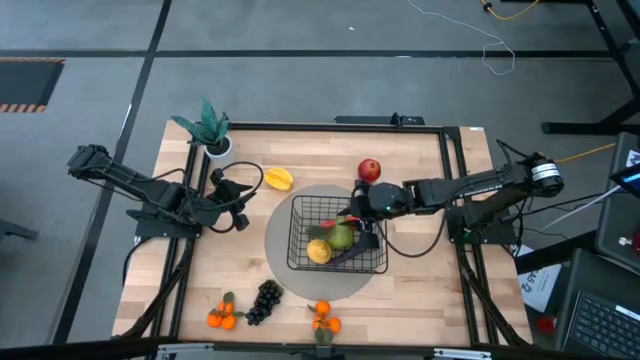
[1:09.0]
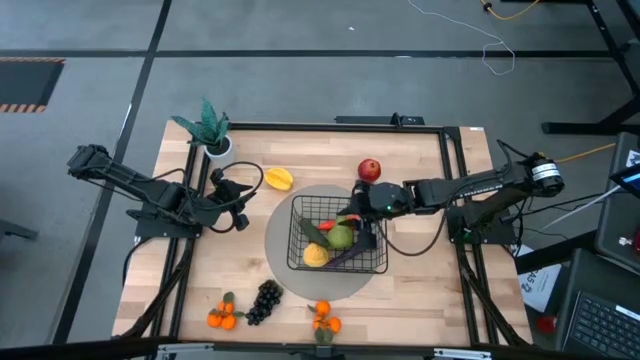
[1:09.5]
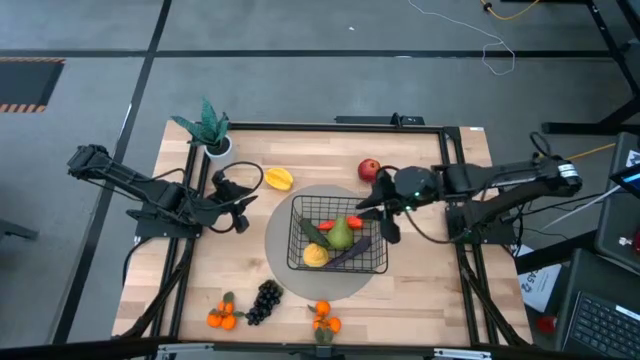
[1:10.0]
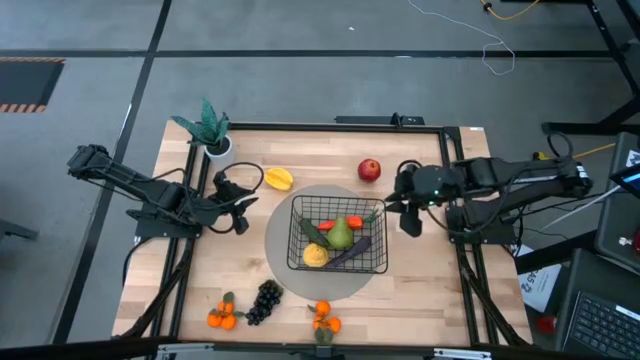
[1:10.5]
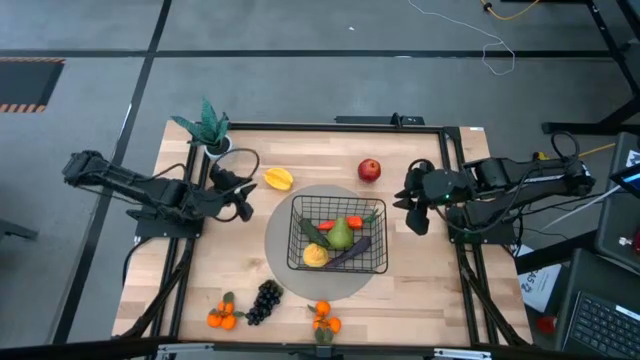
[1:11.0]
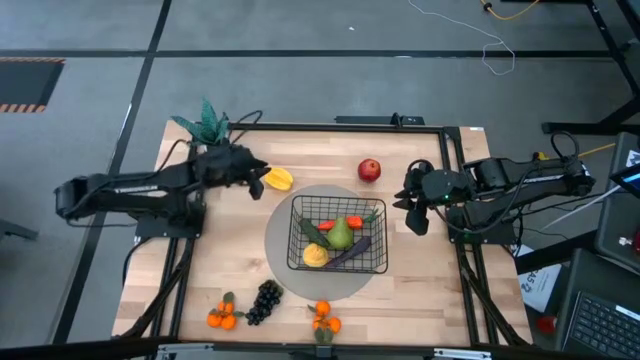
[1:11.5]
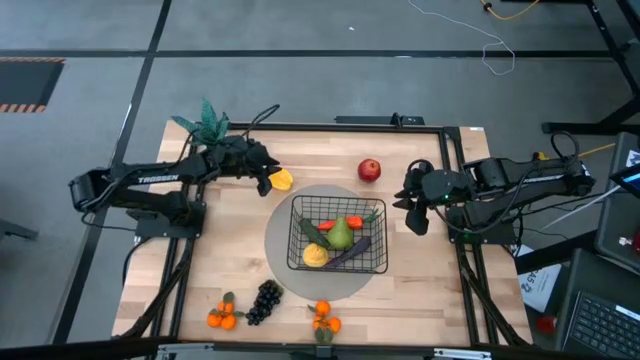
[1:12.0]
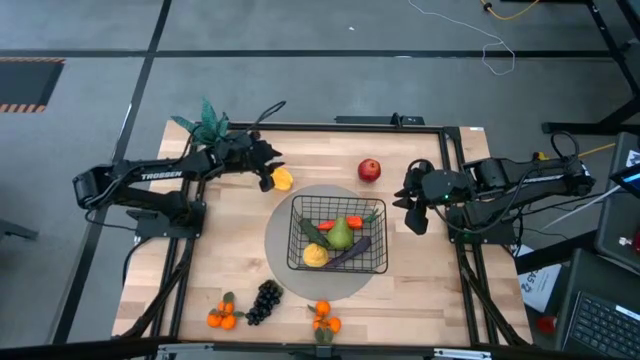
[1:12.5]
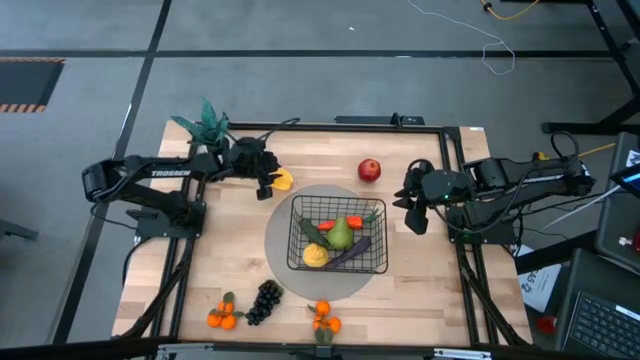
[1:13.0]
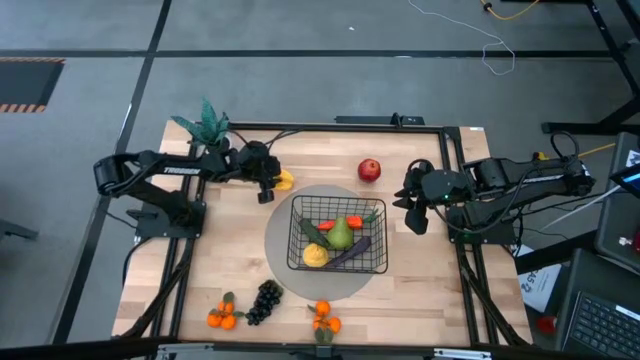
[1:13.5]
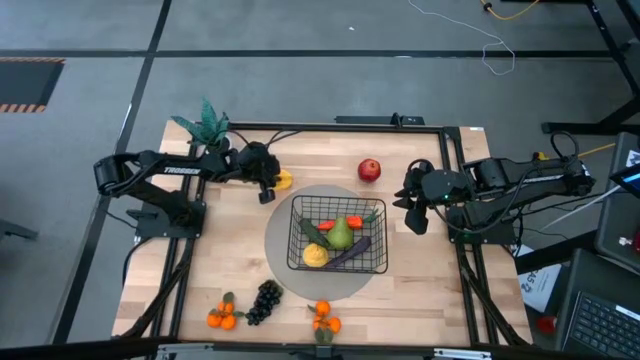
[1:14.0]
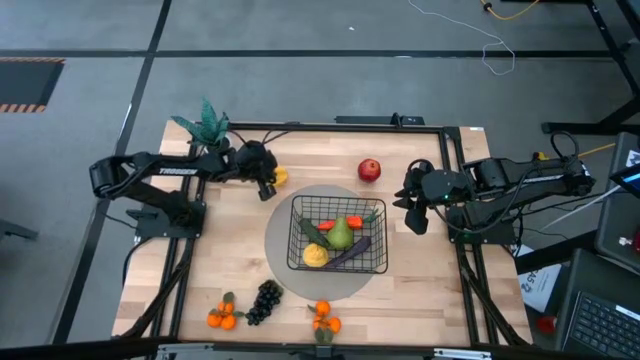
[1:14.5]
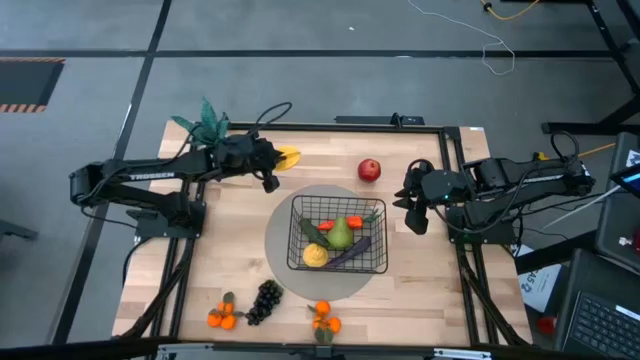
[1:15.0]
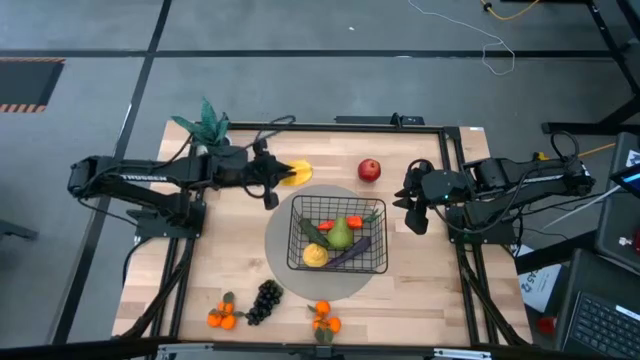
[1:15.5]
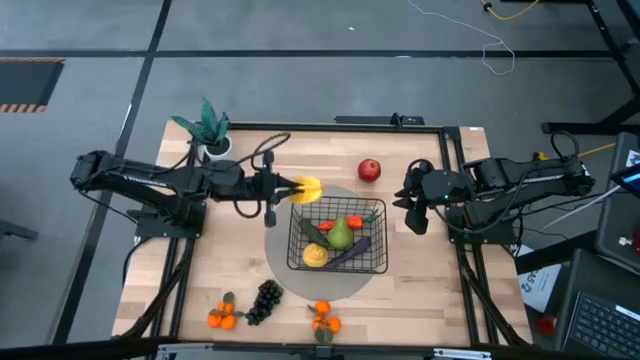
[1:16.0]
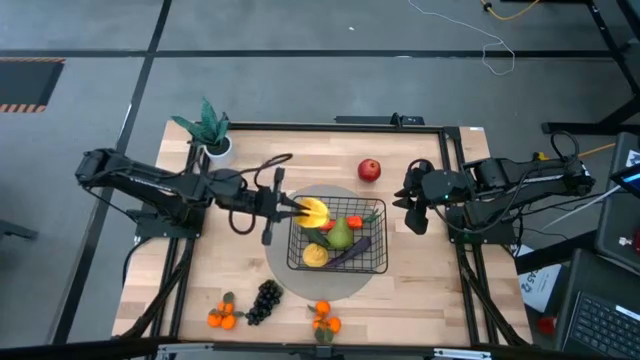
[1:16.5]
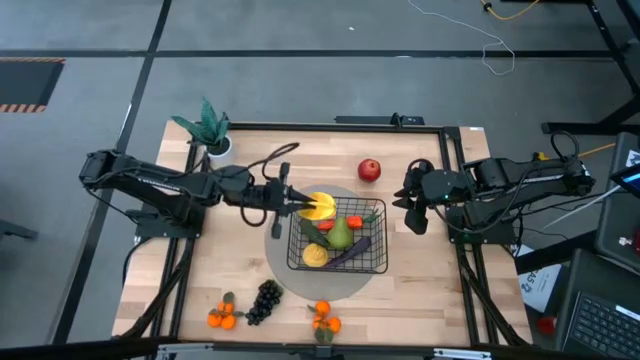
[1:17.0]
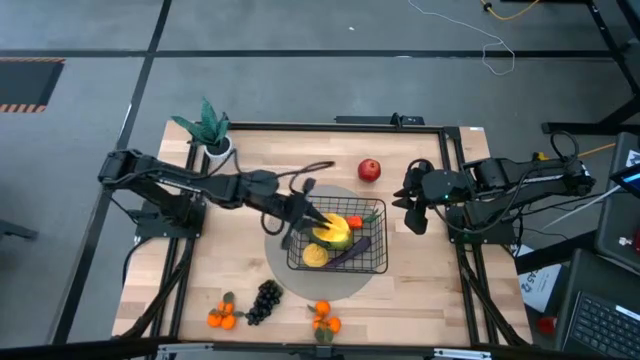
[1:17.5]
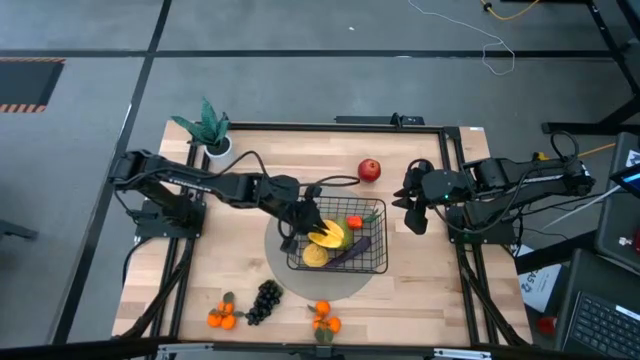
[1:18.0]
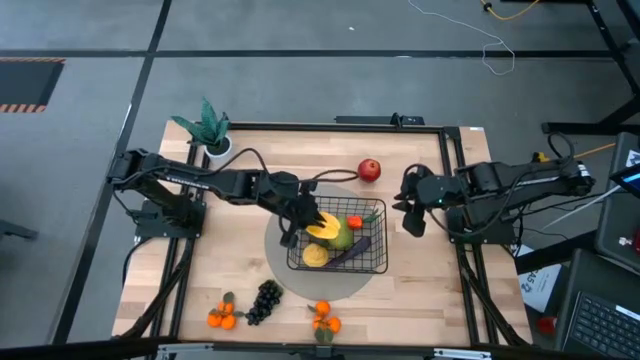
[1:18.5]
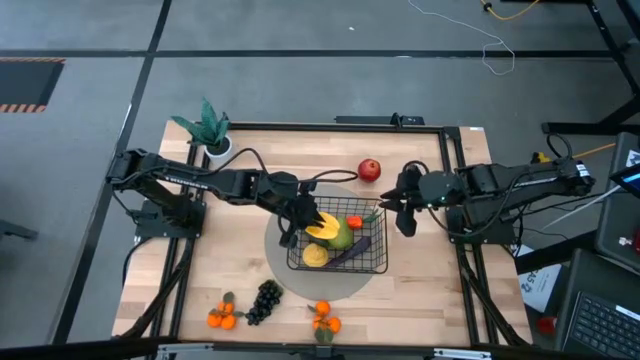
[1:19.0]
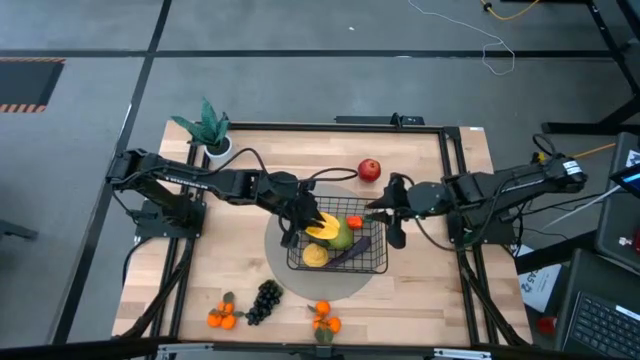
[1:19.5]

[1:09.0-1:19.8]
Task: Build produce basket
Put the yellow star fruit into the wire basket

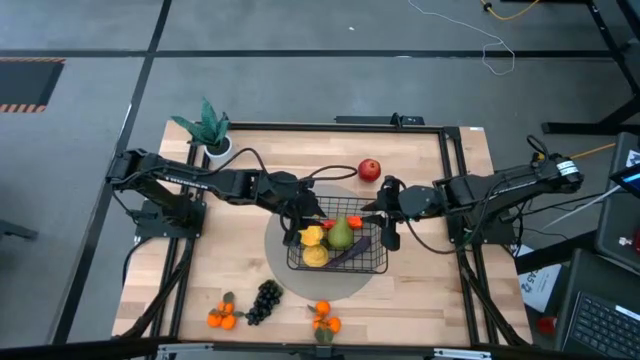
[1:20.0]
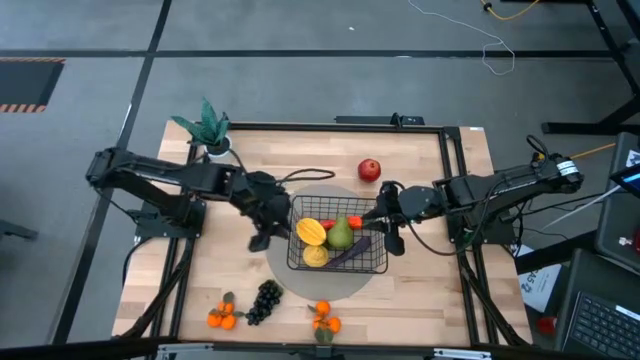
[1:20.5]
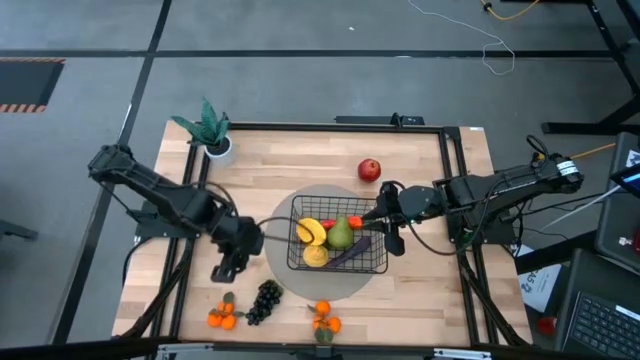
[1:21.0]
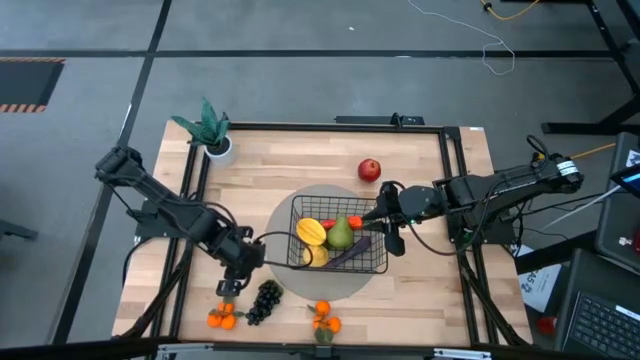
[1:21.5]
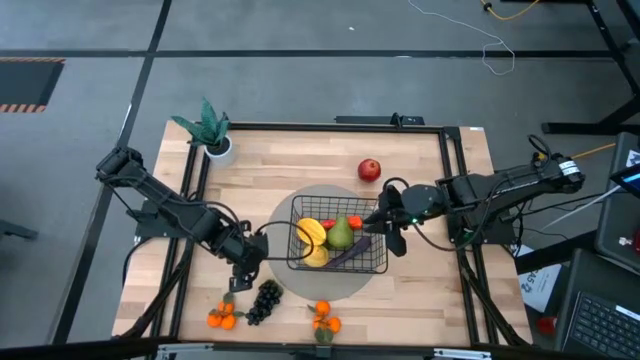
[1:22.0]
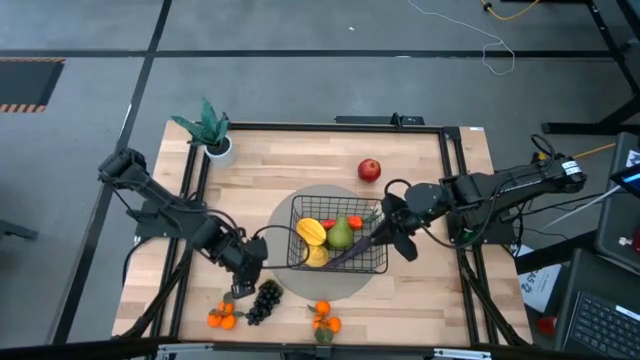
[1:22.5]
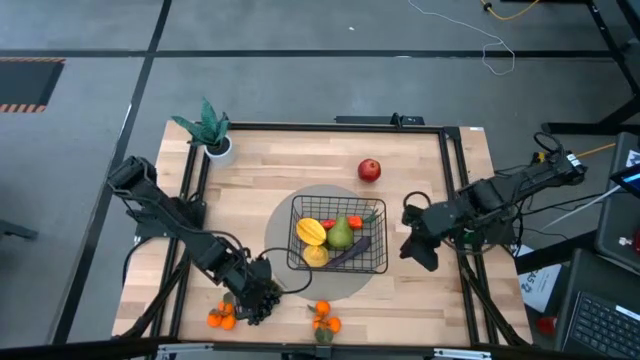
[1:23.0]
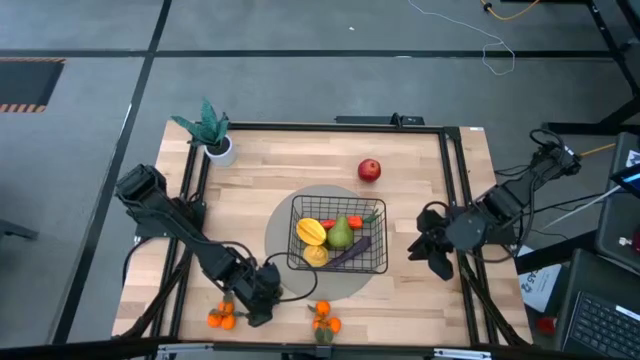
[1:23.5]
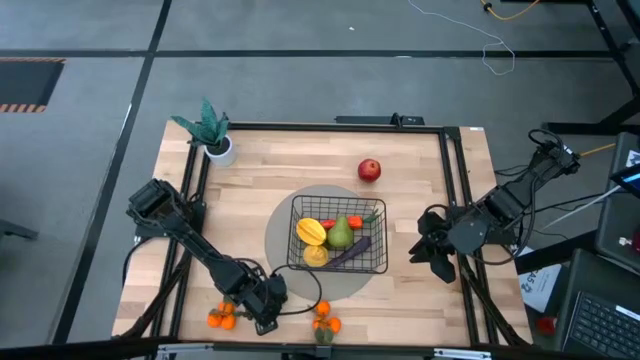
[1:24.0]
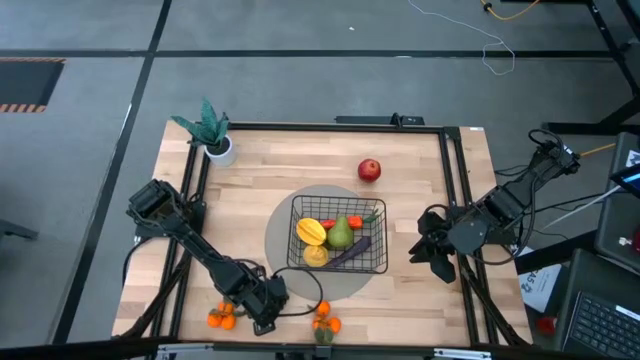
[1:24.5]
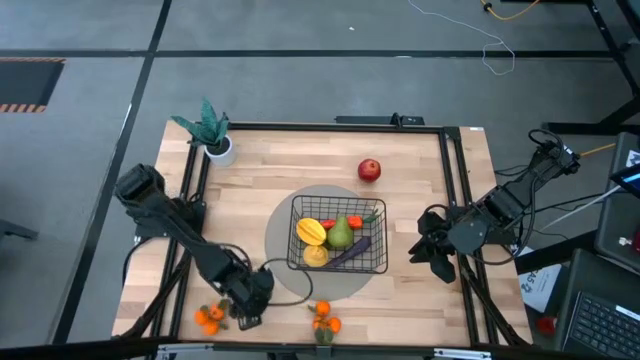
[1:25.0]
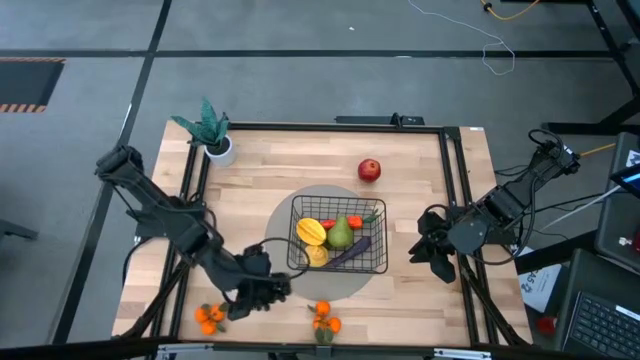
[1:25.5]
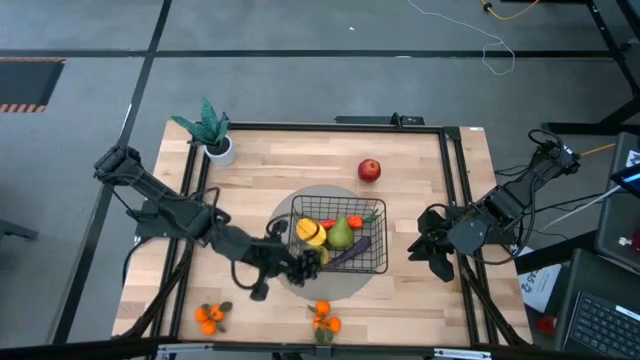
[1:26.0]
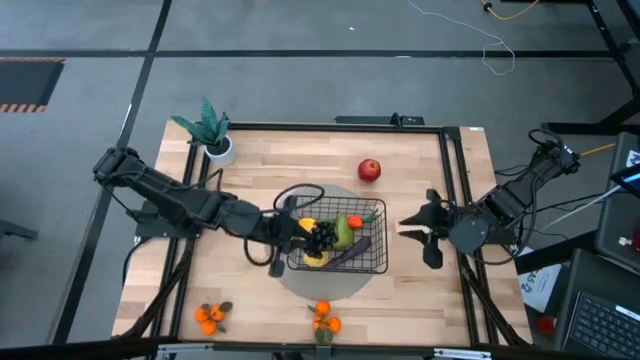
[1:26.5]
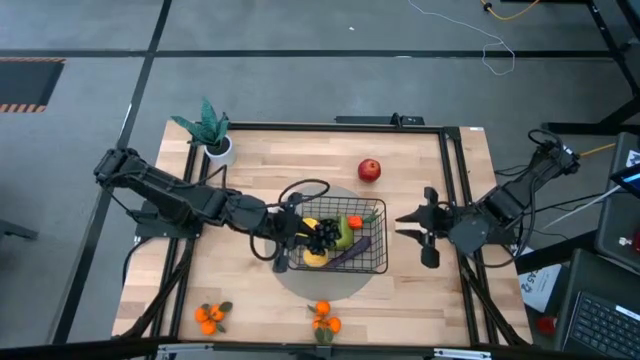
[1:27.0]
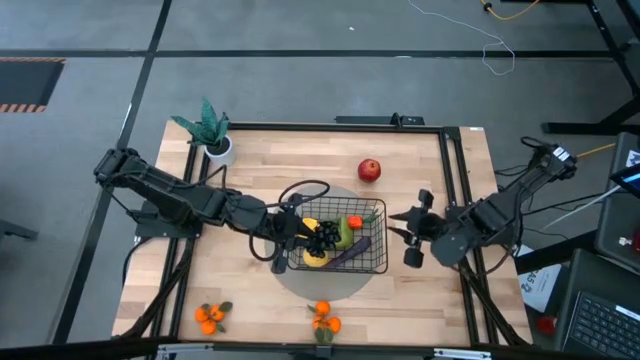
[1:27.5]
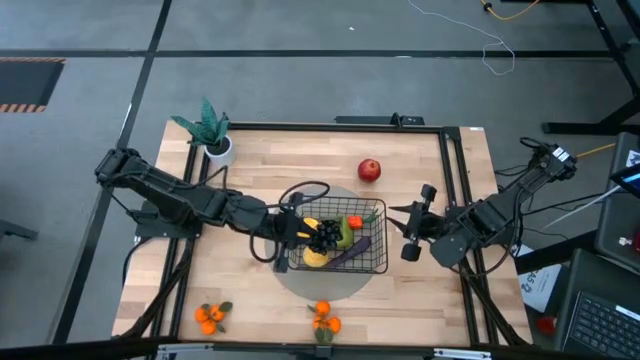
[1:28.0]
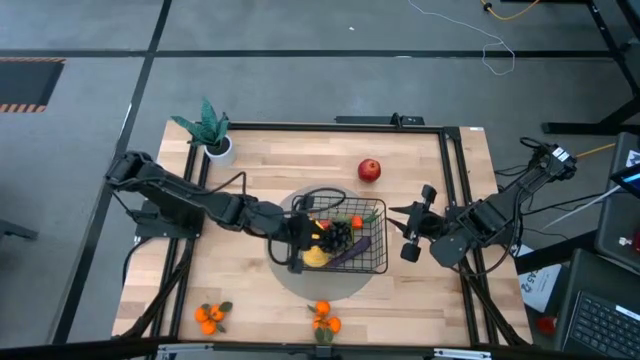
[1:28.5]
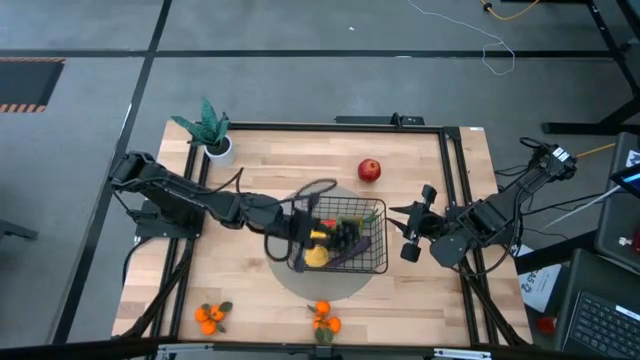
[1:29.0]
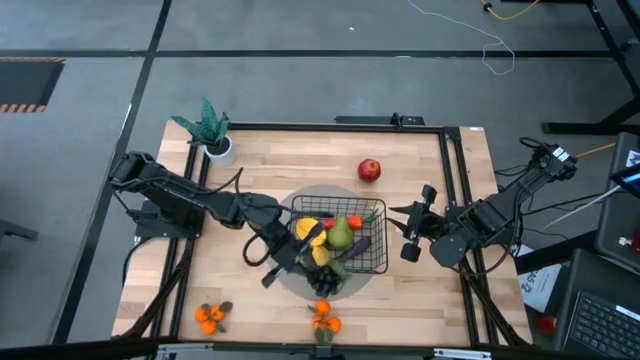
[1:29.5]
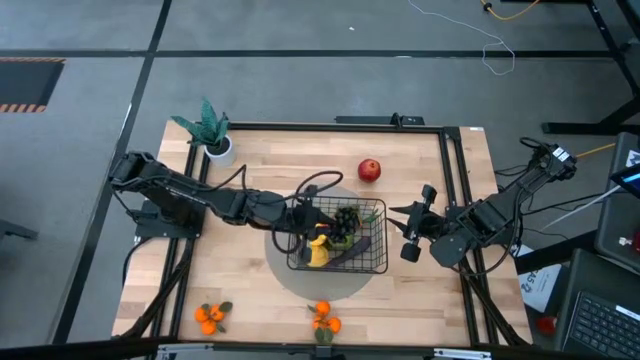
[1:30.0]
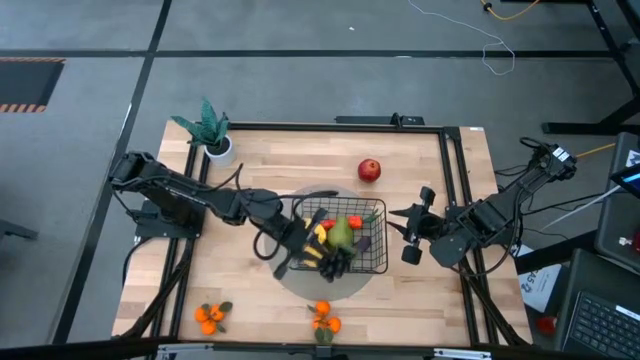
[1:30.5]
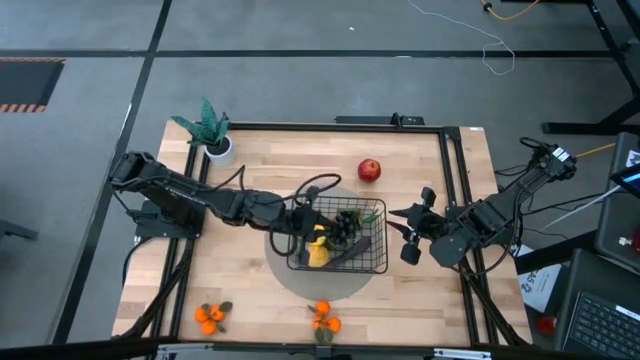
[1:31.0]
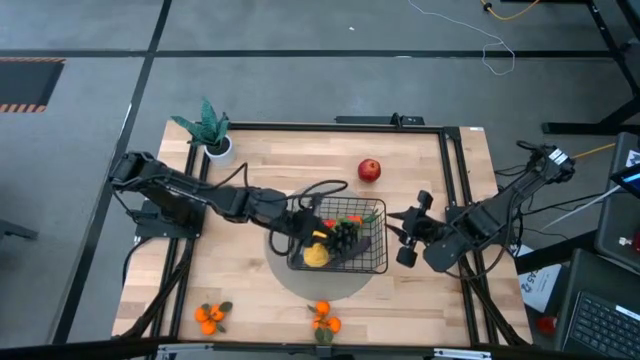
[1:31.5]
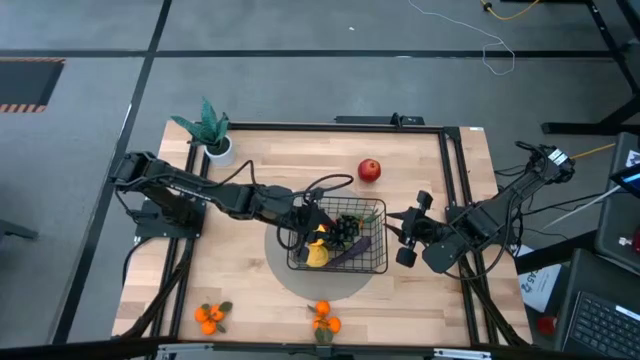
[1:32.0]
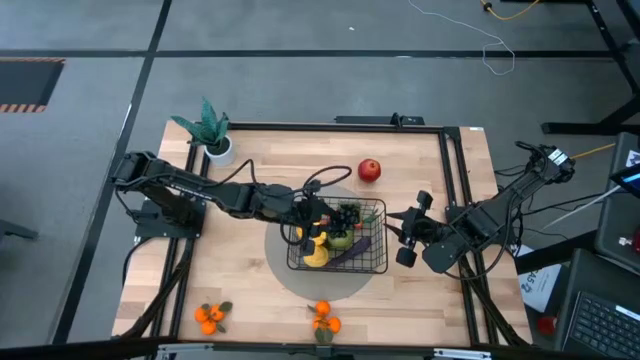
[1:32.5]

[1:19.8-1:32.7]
Put the purple grapes into the wire basket
